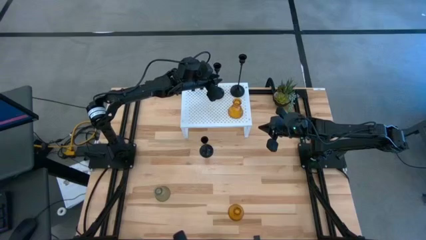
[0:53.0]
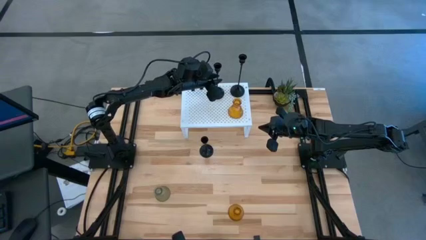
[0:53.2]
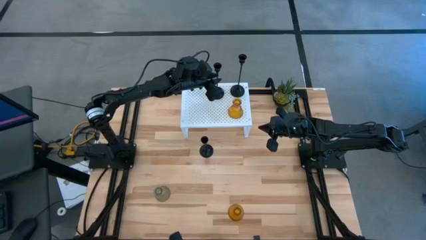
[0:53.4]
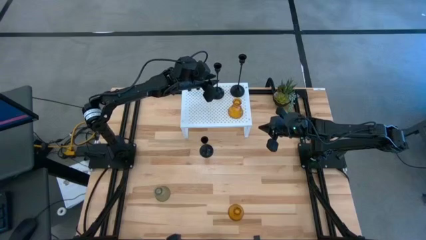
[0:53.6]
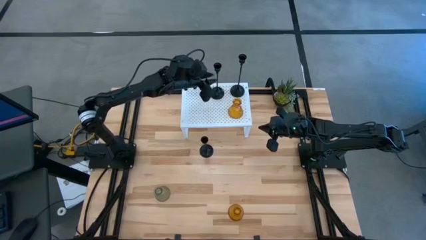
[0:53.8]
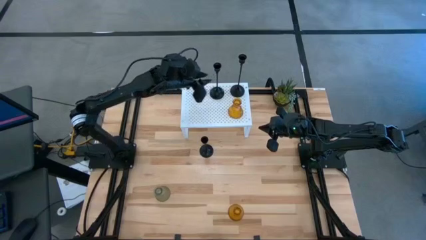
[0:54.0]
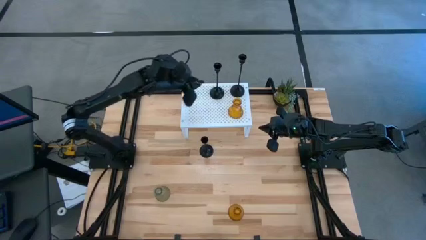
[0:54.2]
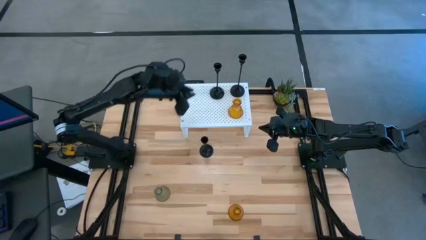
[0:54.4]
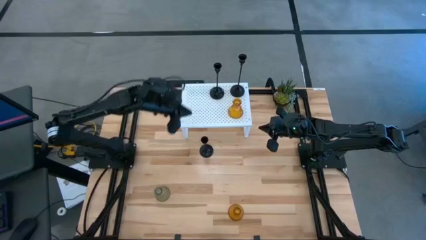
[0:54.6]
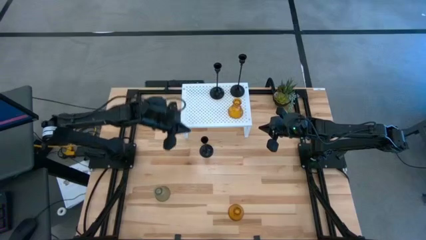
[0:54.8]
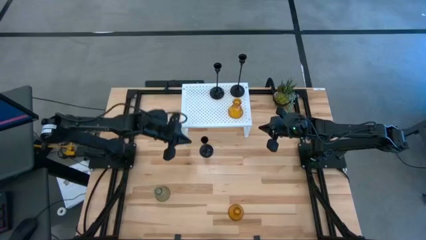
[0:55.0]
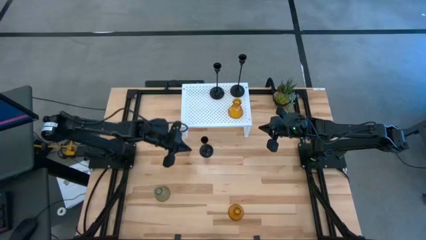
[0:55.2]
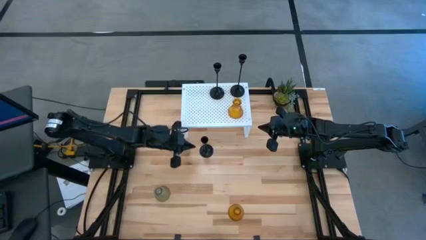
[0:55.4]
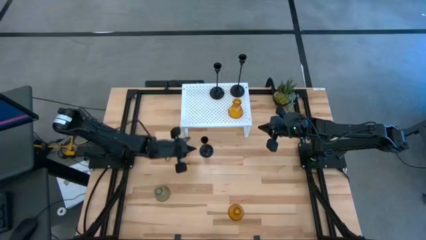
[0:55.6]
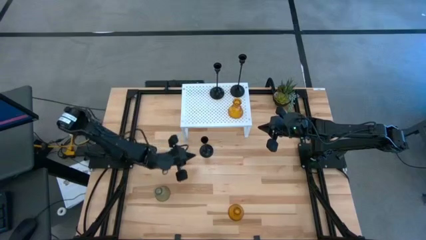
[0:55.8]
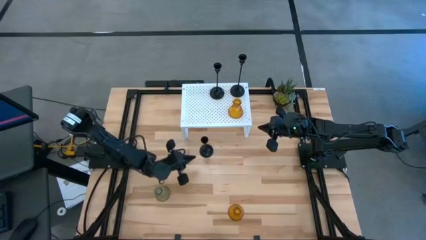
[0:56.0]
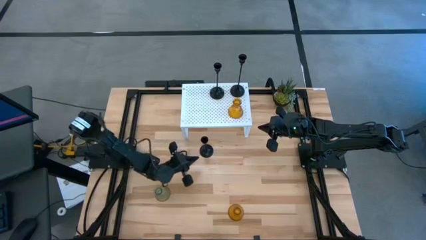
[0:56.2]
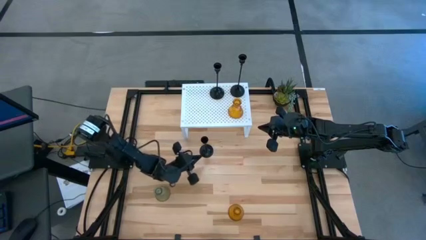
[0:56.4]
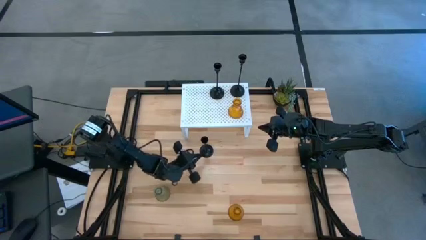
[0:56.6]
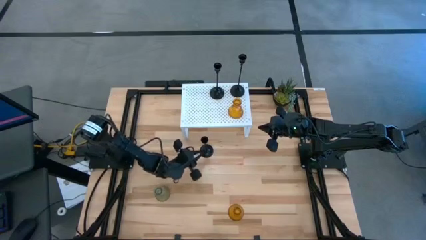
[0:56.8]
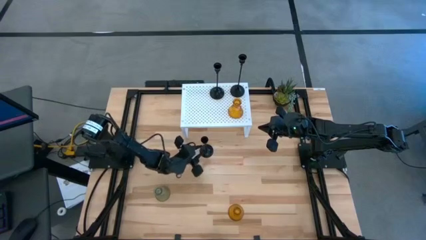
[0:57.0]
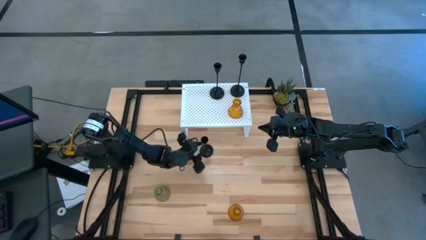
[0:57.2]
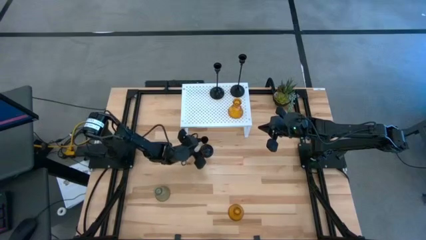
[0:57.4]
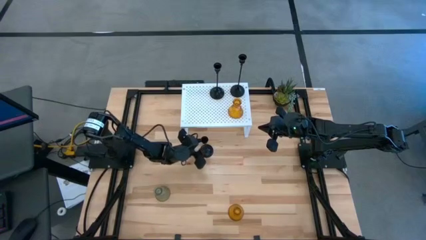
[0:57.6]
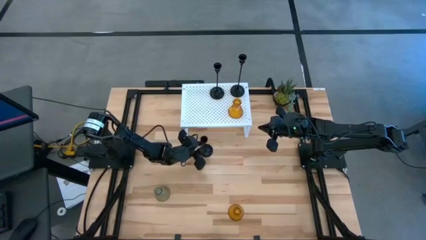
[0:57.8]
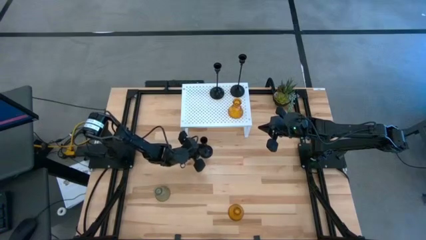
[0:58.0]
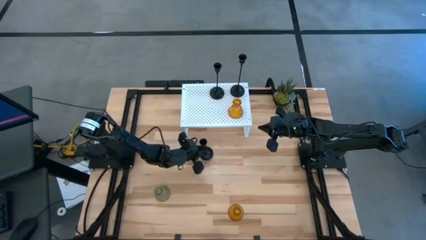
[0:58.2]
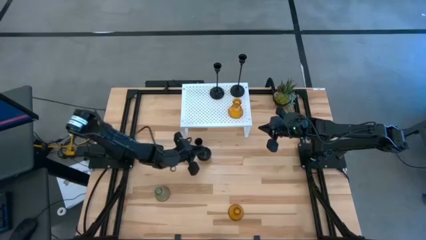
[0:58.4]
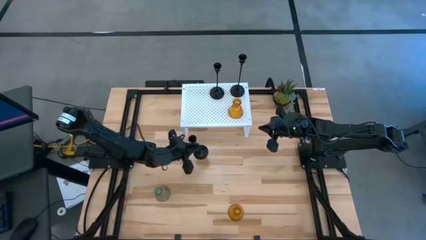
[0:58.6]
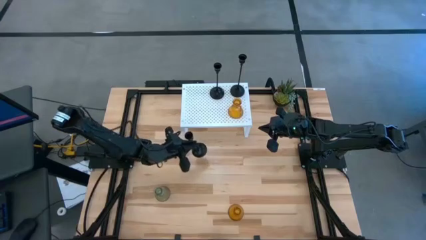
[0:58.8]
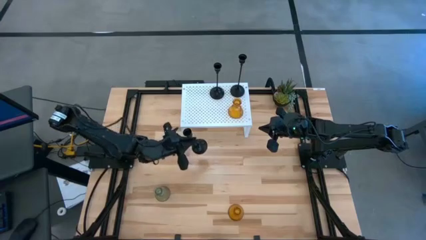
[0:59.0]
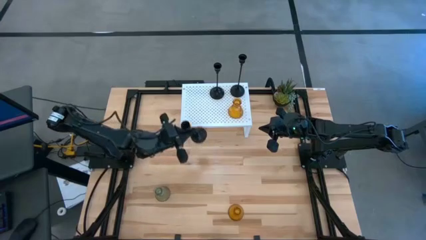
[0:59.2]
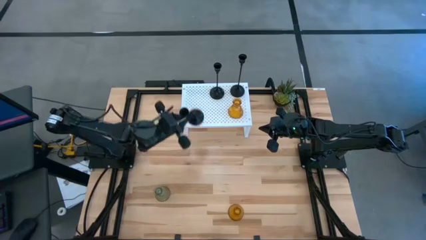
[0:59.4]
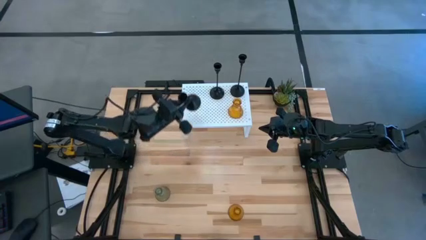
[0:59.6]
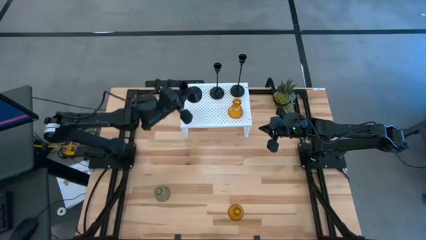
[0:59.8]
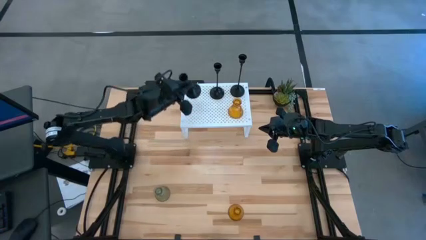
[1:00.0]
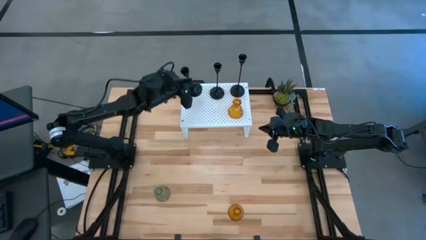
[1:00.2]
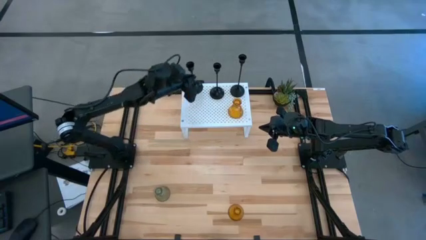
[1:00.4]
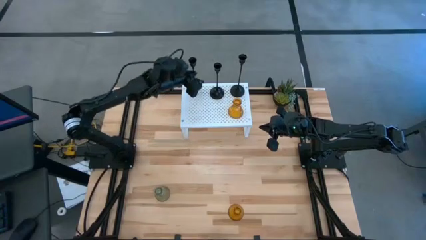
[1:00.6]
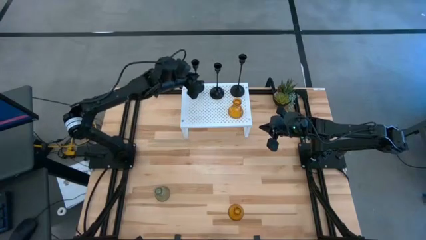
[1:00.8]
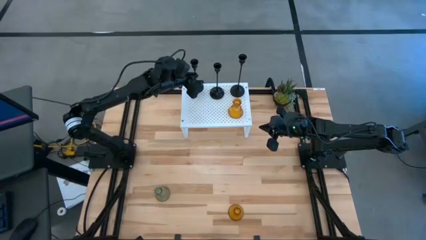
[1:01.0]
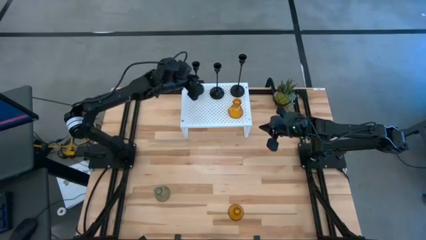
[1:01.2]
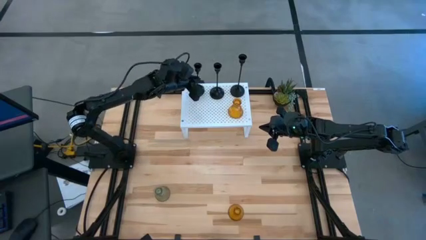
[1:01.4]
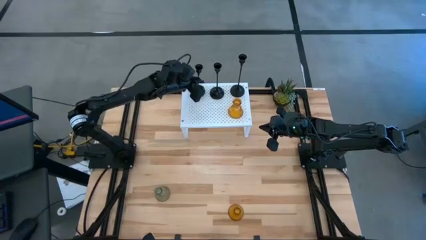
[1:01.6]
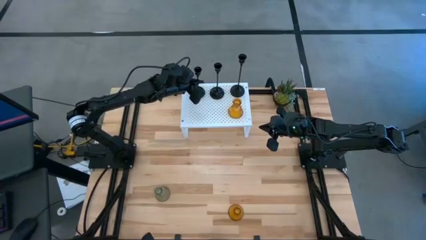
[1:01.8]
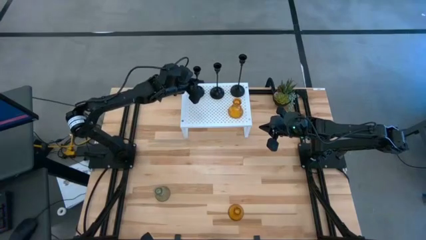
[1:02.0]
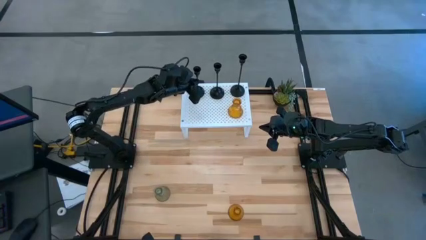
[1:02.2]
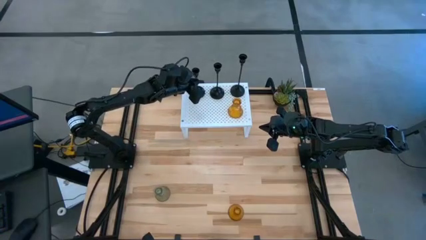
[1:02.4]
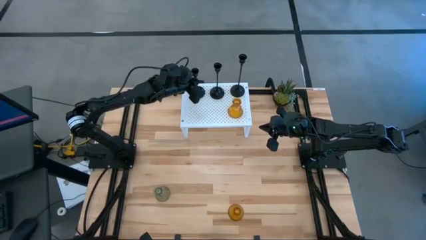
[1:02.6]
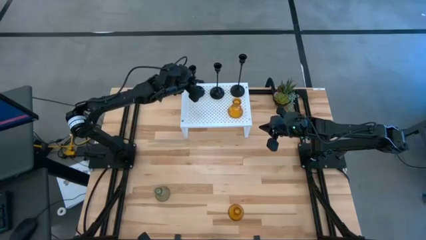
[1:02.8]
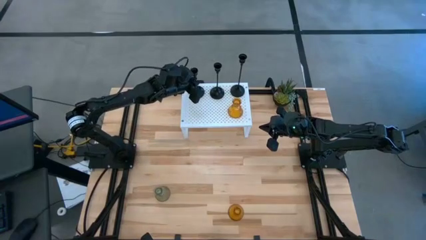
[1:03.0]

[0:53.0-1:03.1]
Task: Pick & Place candle stick holders
Put the black candle holder on the shelf

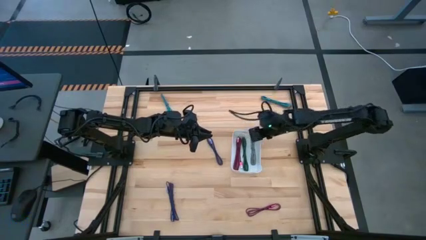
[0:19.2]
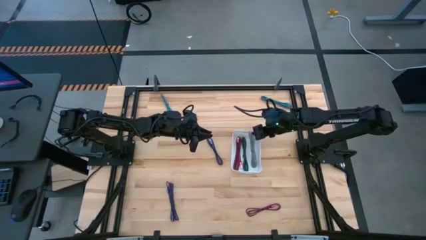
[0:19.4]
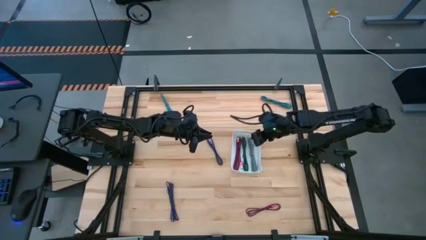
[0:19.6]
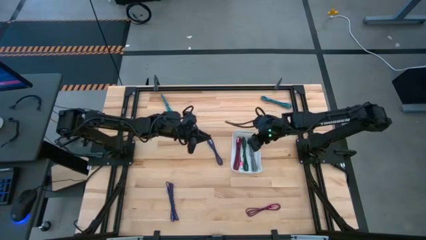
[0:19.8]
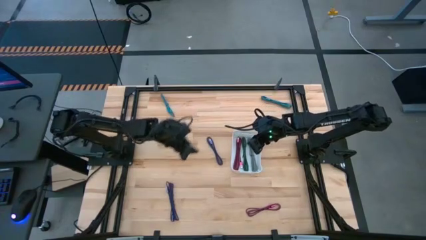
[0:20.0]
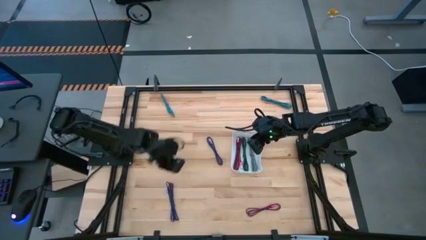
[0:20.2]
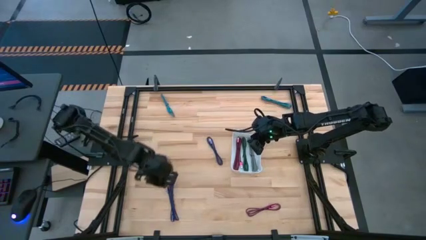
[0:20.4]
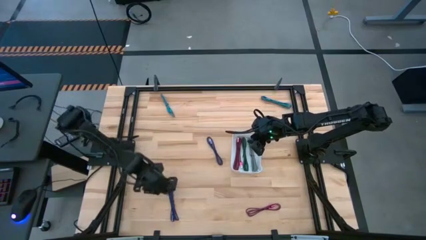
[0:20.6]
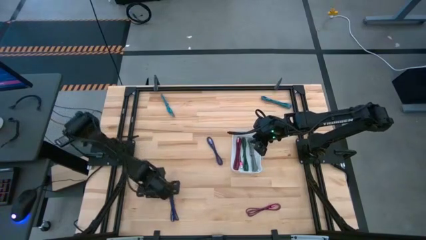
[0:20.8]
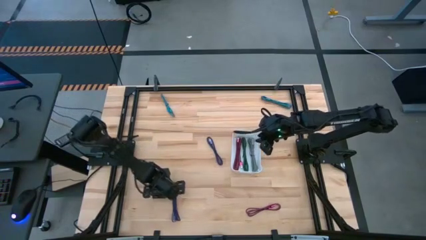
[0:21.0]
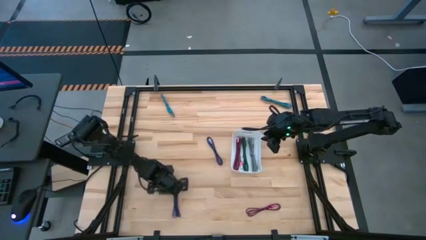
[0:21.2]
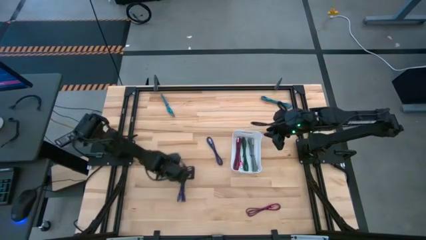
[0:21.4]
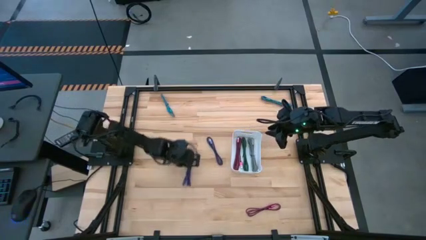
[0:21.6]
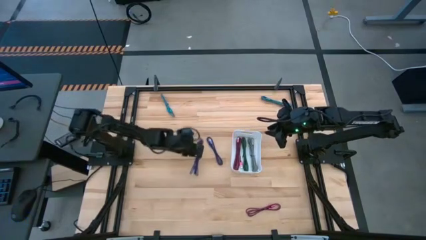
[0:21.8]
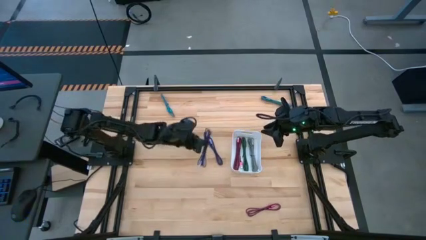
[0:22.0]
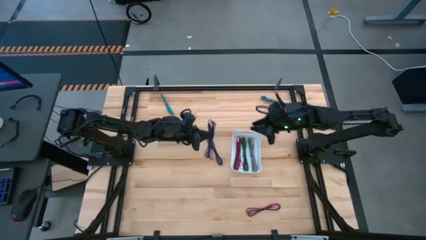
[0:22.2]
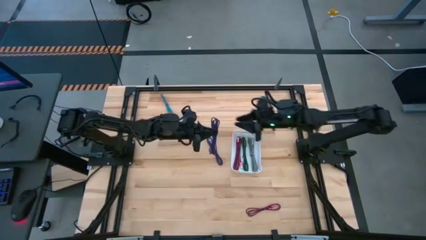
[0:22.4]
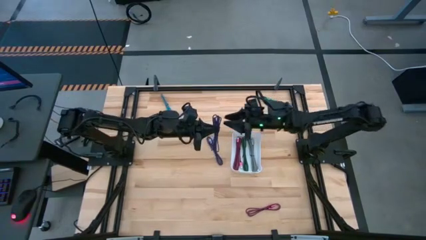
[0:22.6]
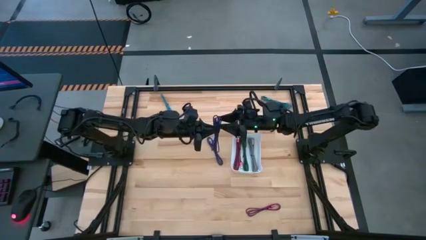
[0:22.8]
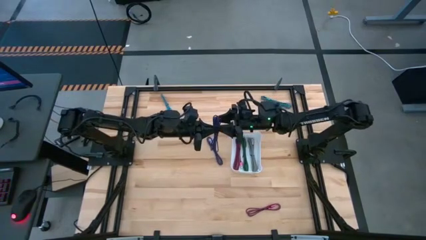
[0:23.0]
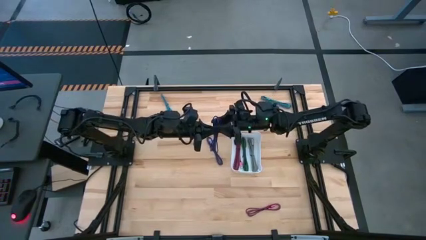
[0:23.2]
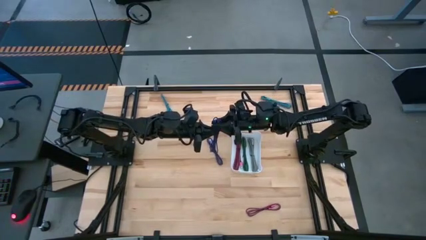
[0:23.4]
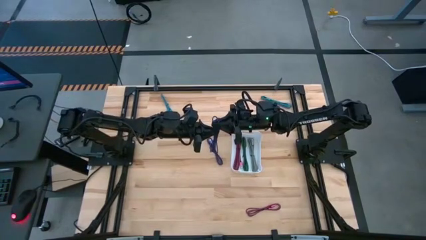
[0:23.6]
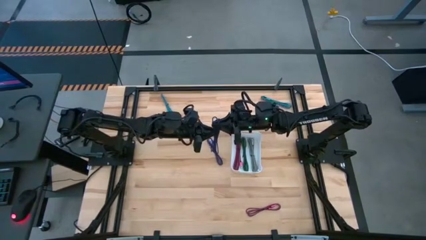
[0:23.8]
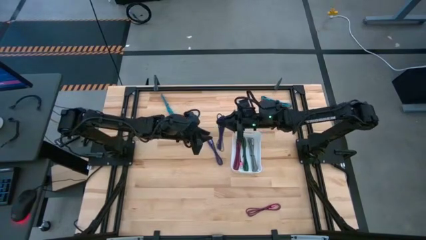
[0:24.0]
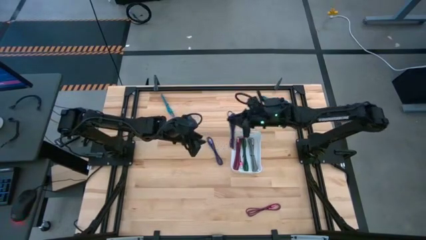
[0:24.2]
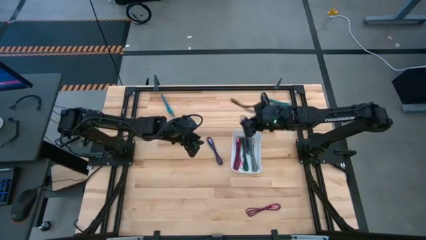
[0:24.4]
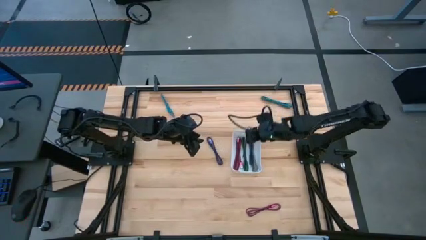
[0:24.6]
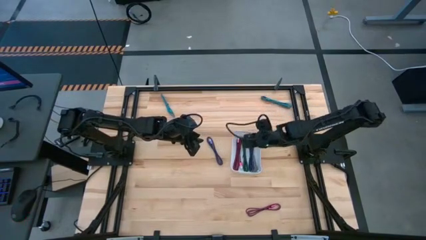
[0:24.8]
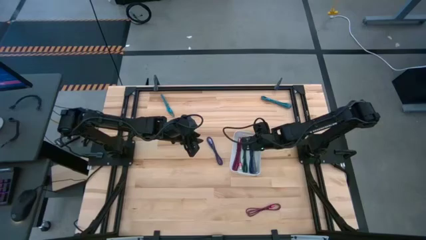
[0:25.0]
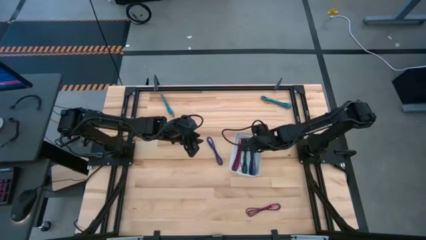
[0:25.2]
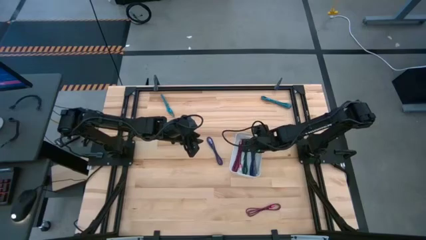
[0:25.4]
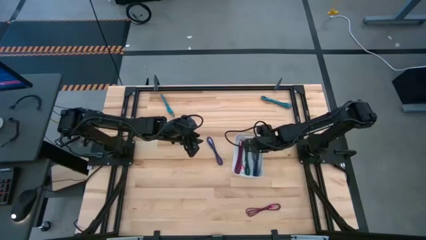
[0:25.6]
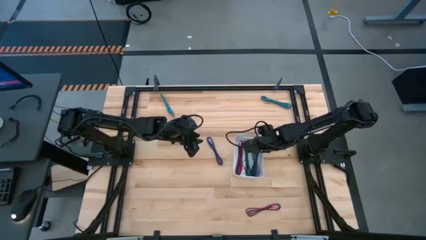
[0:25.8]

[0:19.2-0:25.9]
Task: Pick and place USB-C Cables
Put the bottom violet charger cable into the white bin
